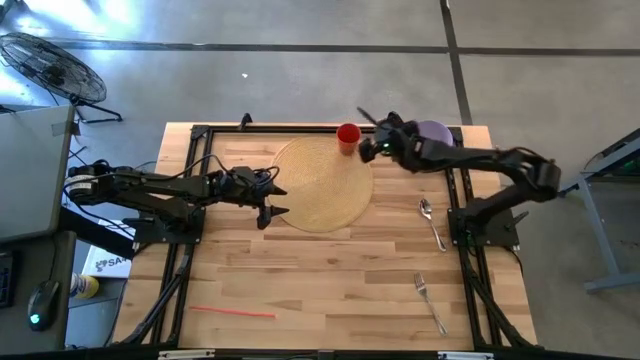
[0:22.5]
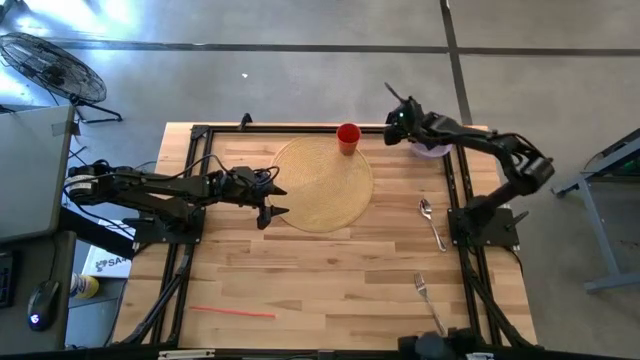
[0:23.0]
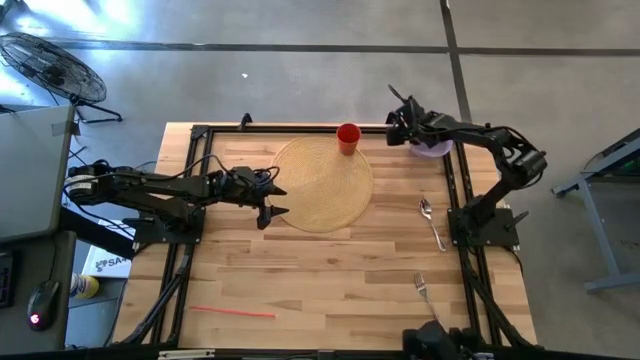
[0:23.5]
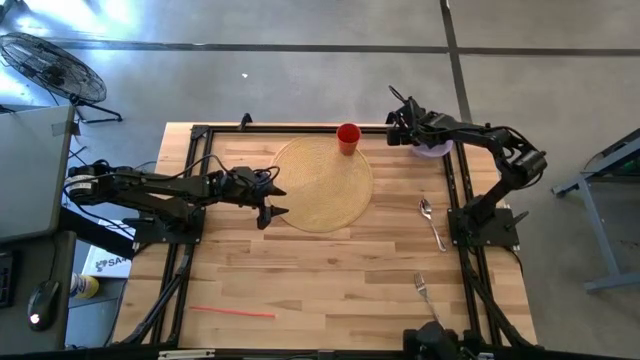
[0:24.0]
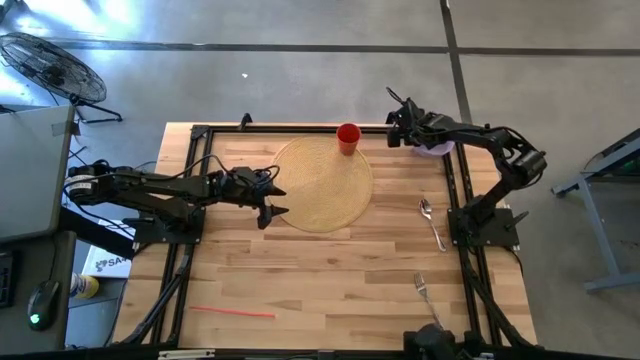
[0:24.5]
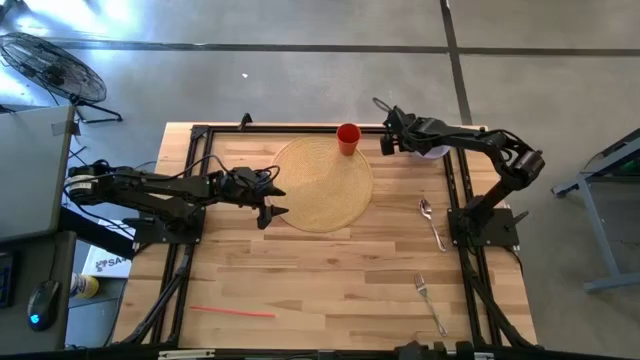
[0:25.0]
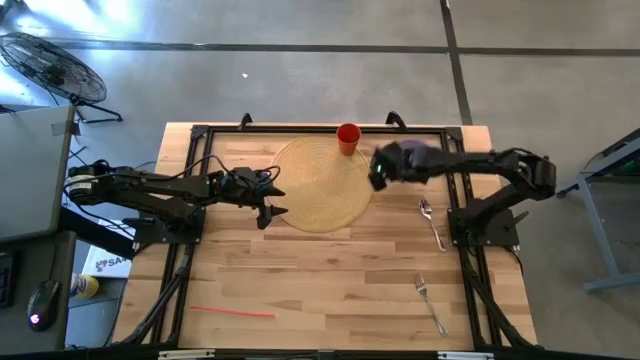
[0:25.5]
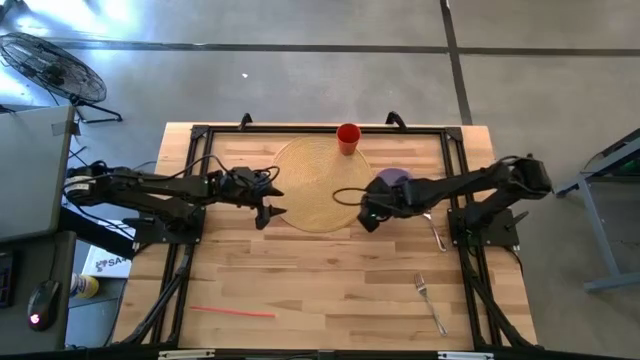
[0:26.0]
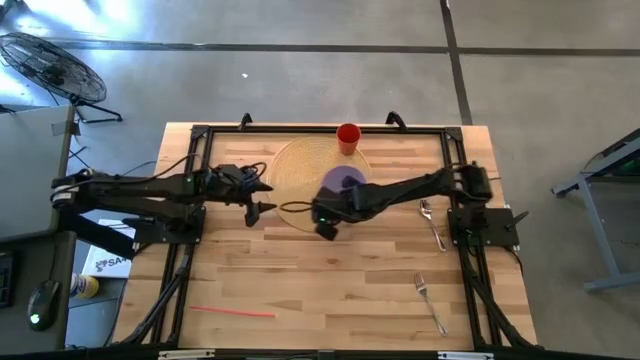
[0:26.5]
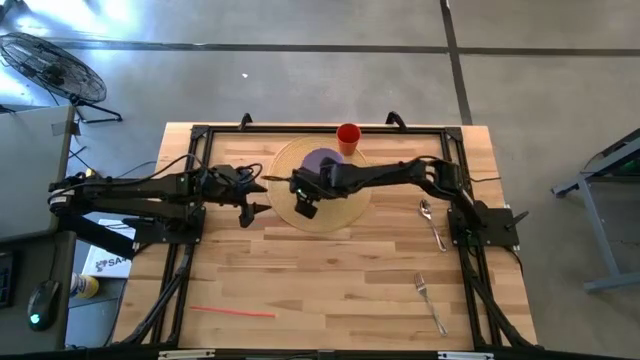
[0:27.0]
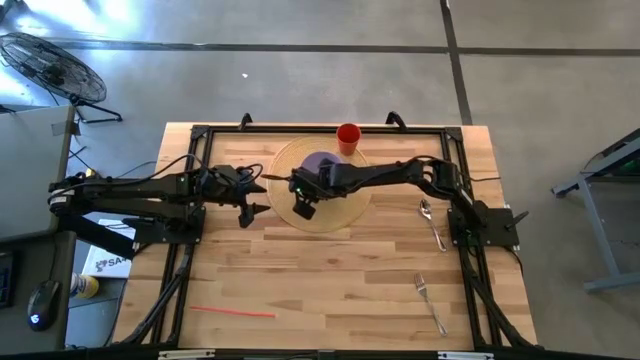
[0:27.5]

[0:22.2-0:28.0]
Task: Pick & Place Utensil
Put the purple bowl on the mat to the bottom left of the orange cup

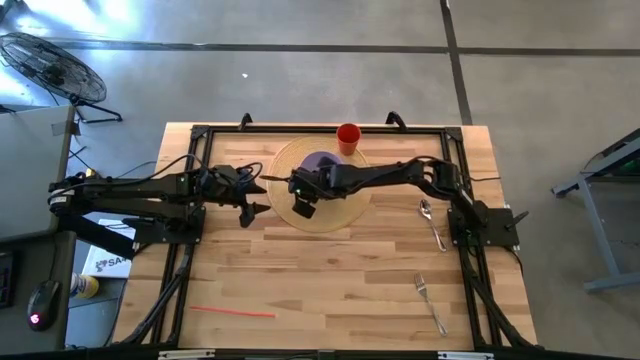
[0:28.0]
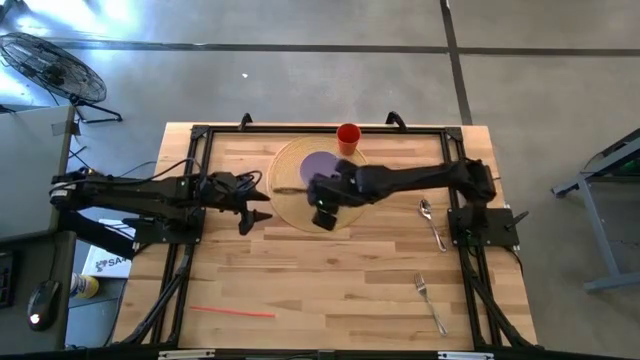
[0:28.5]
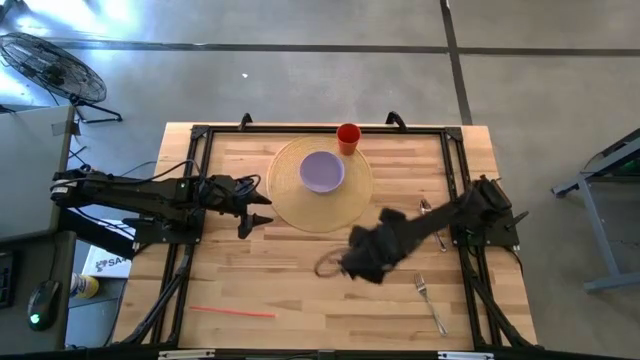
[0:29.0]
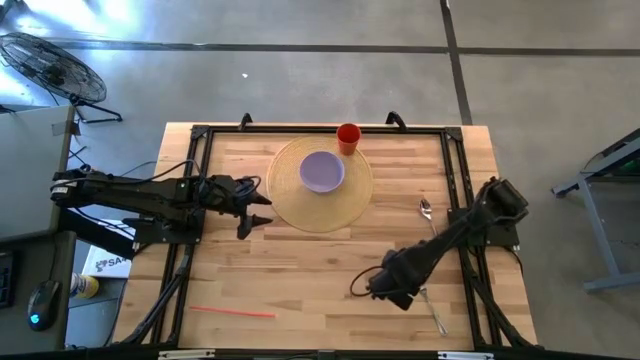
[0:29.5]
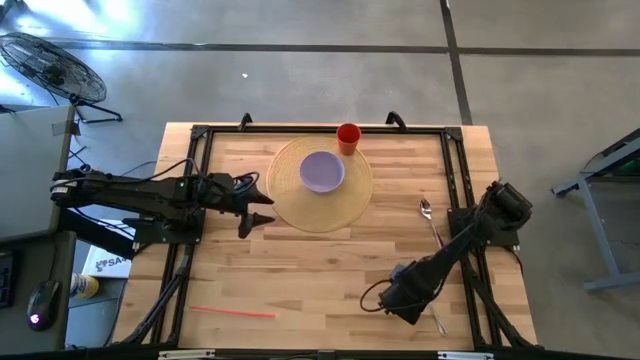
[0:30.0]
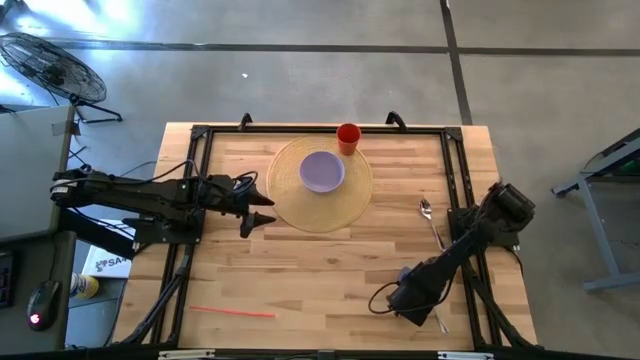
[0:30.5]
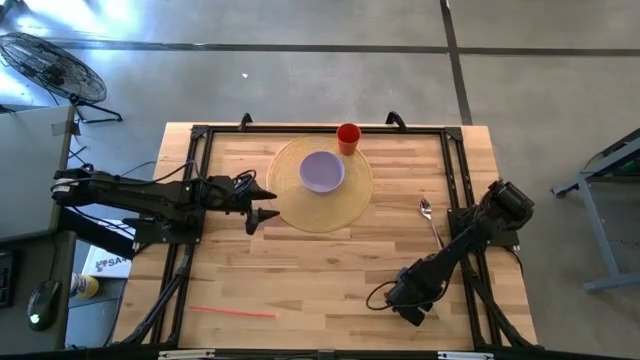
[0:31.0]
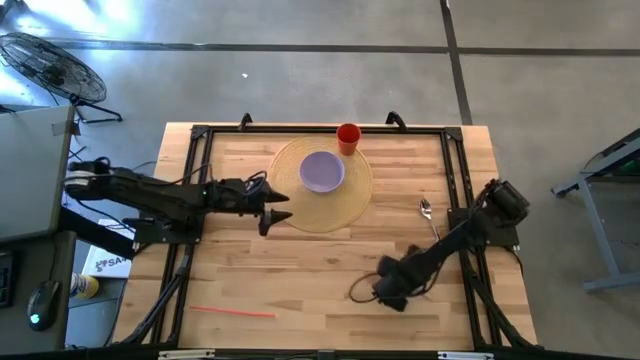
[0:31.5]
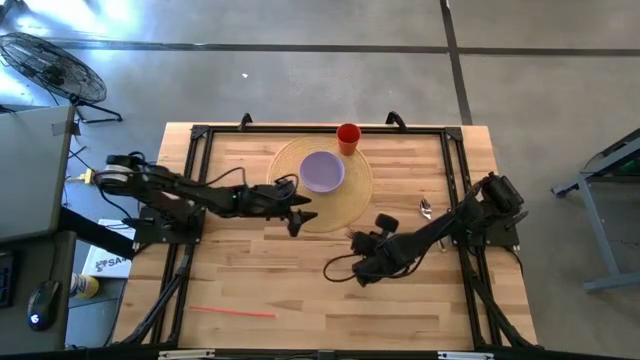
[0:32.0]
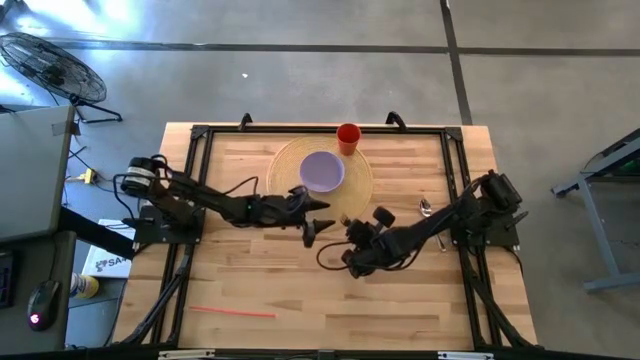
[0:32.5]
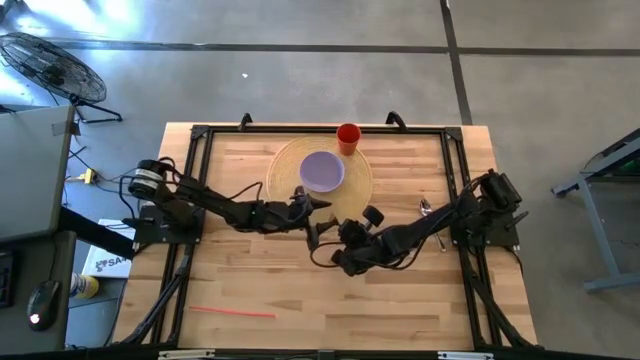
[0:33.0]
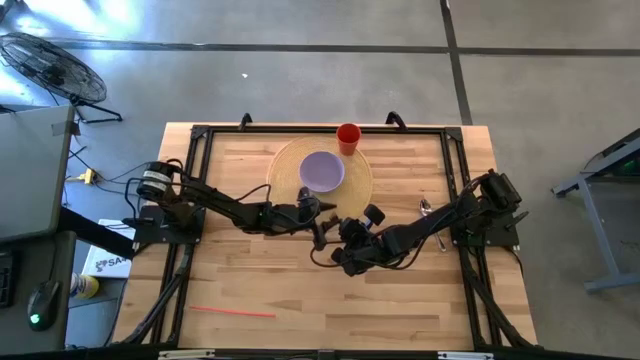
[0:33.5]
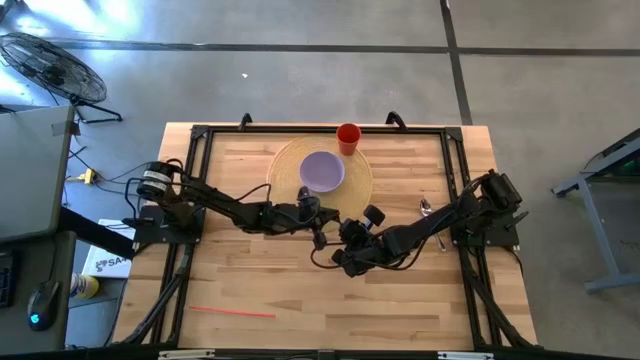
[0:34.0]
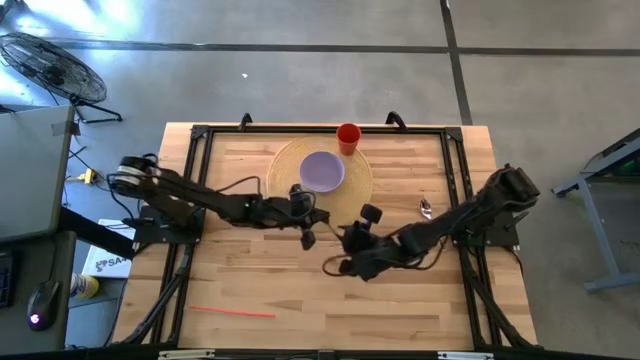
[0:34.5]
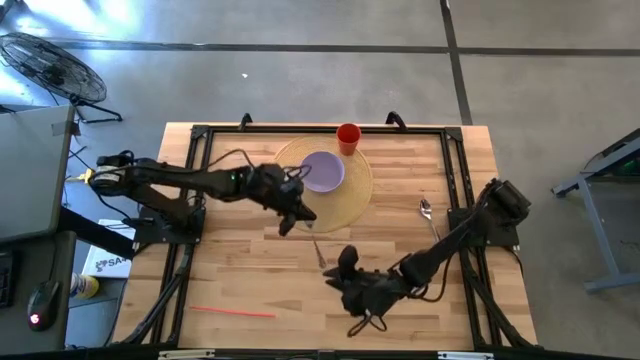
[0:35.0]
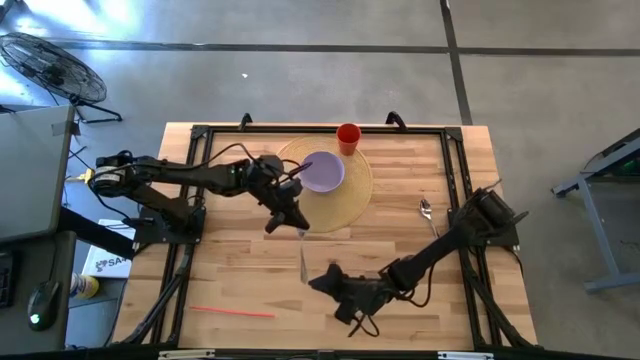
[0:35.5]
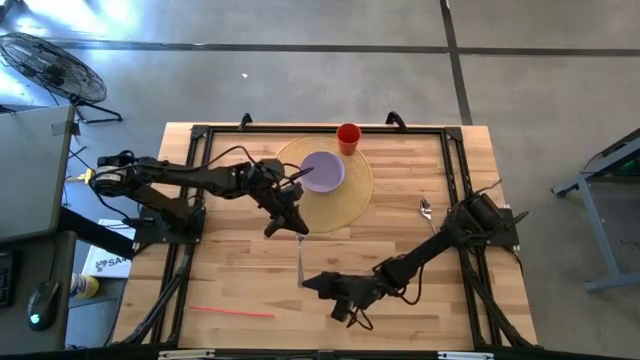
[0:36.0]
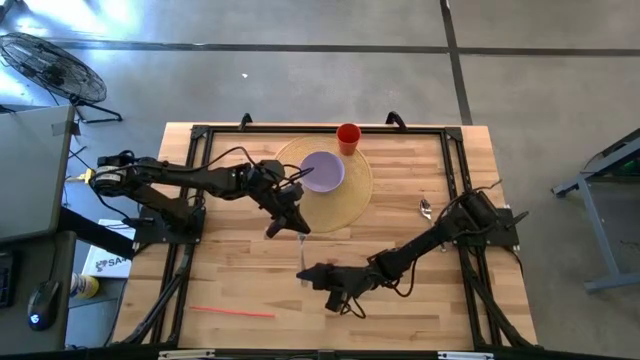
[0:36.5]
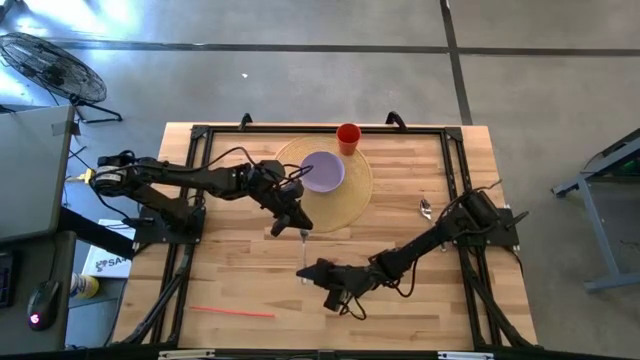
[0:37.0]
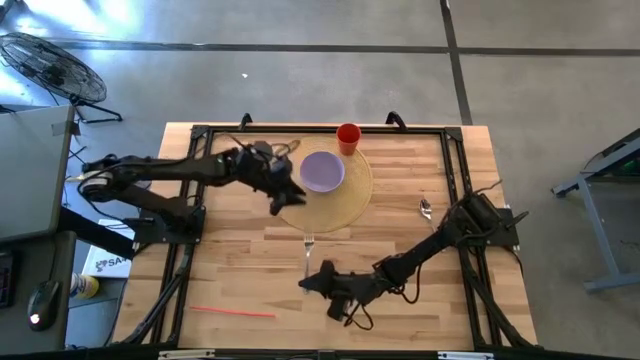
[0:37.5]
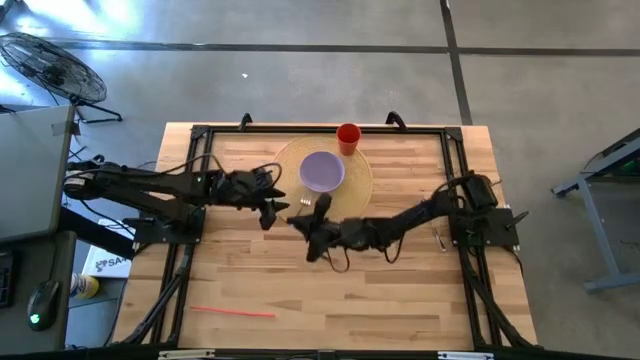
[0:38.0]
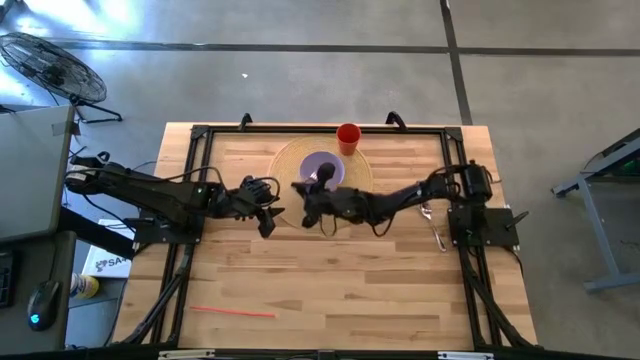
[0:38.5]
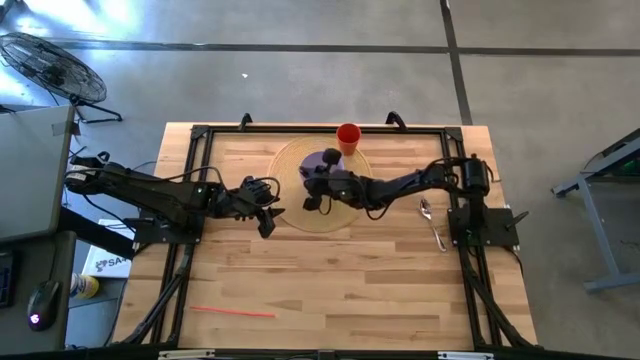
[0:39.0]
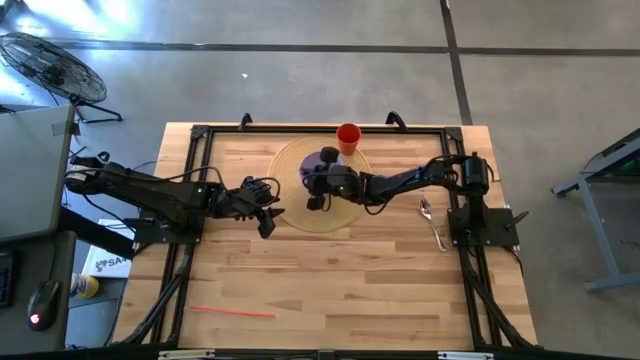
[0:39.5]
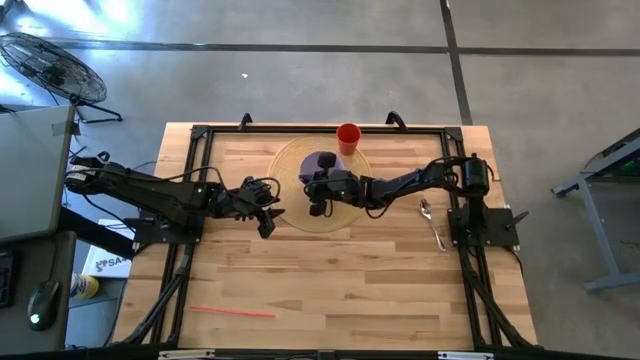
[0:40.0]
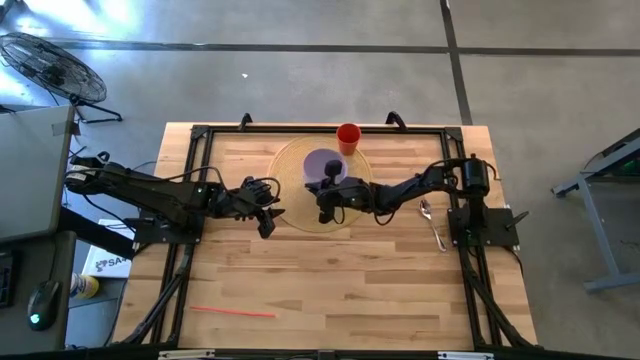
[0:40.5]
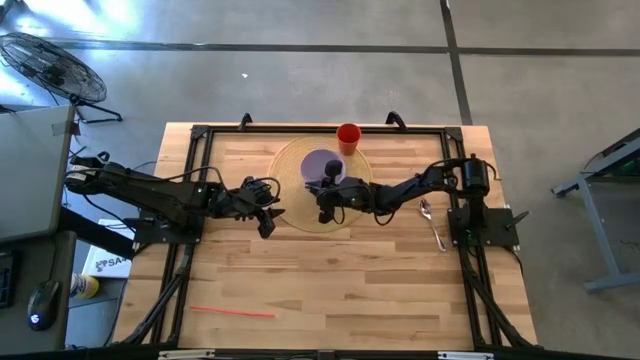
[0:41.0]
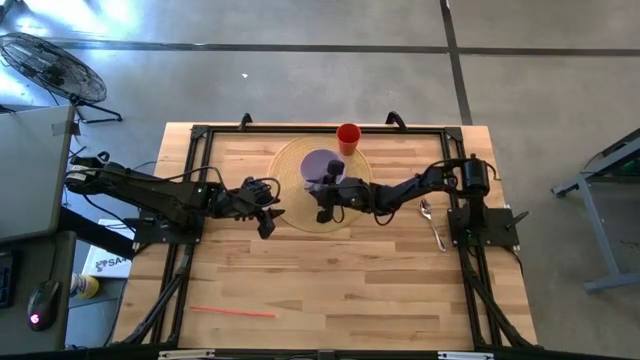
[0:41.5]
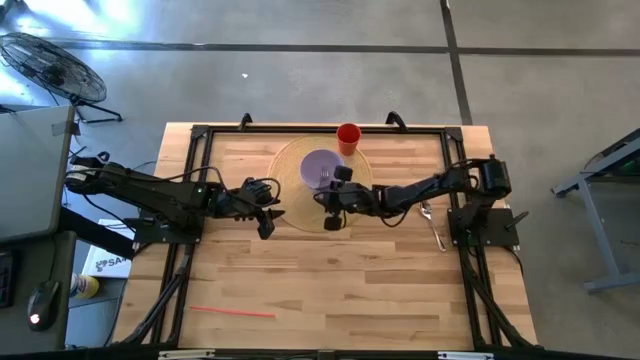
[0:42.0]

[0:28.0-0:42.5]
Put the fork into the purple bowl

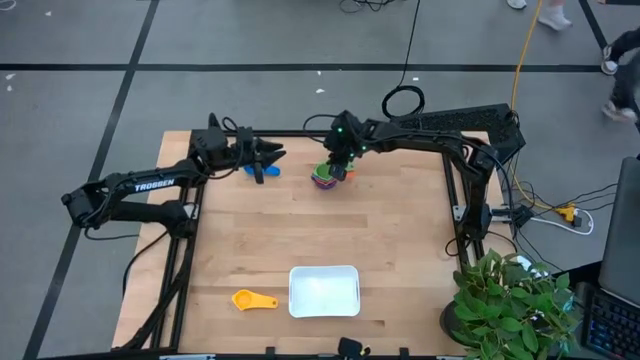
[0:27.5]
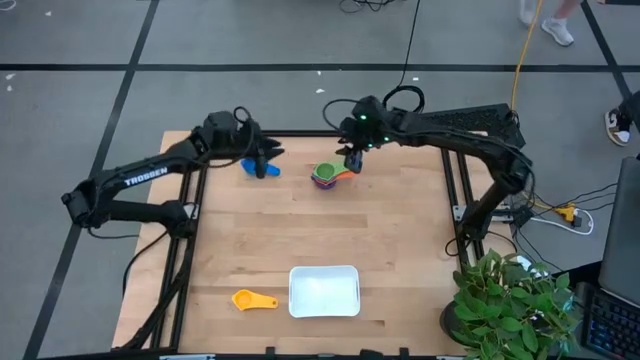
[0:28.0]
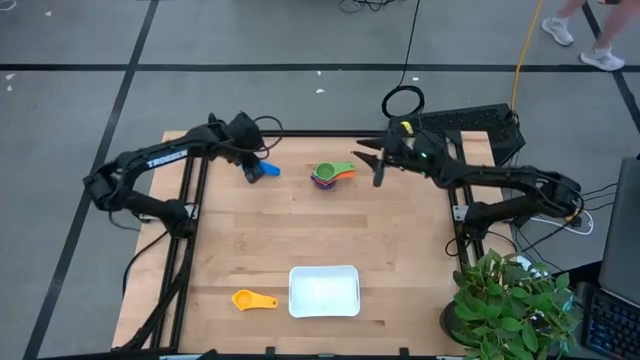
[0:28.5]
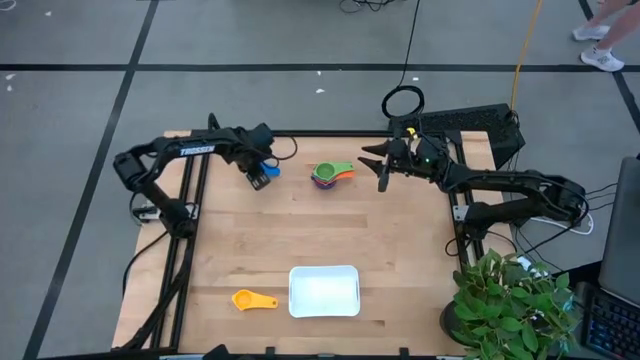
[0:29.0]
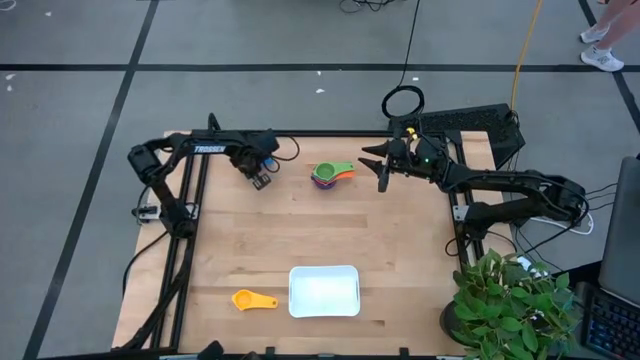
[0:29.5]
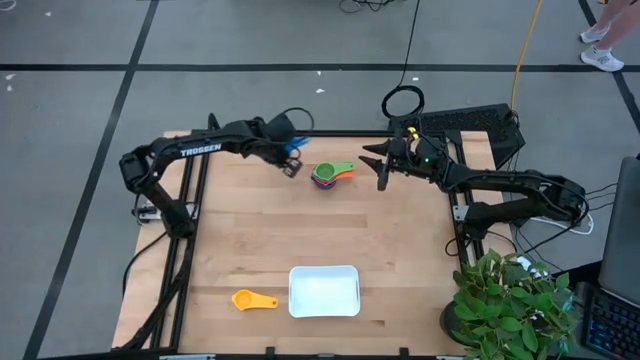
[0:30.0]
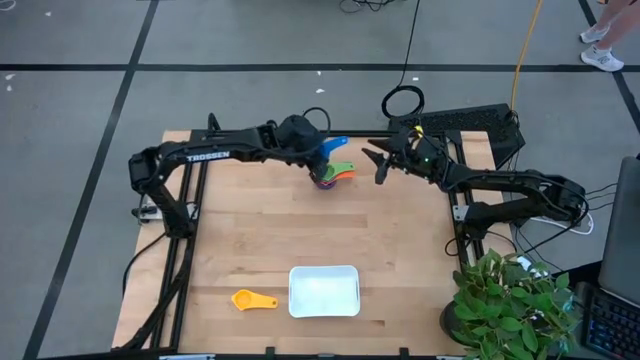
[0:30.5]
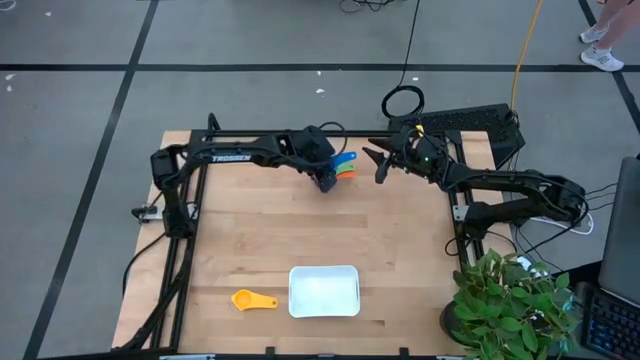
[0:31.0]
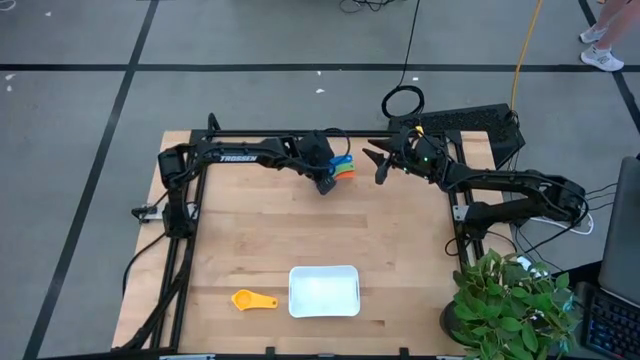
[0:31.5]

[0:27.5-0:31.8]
Task: Nest measuring cups in basket
Stack the dark blue measuring cup on the green measuring cup
